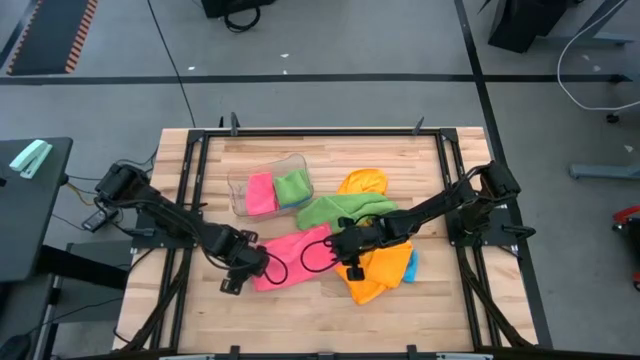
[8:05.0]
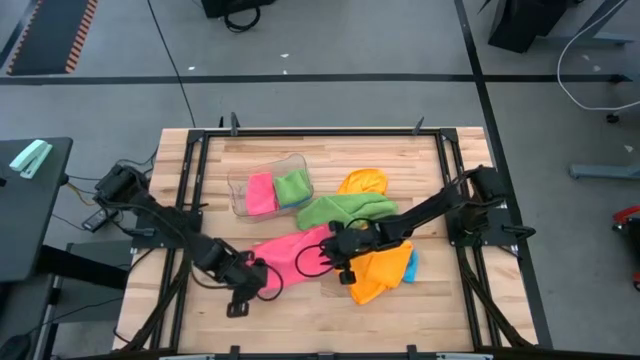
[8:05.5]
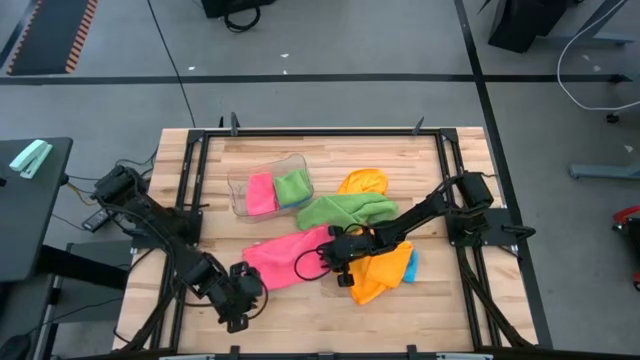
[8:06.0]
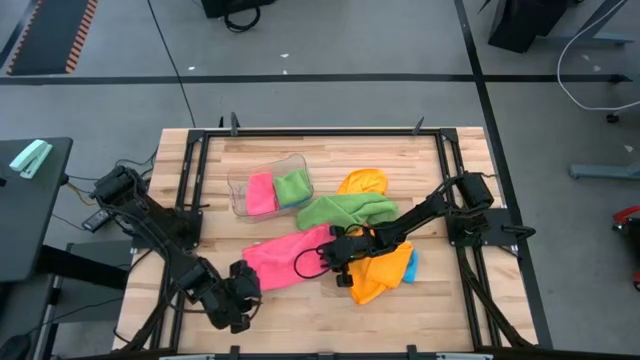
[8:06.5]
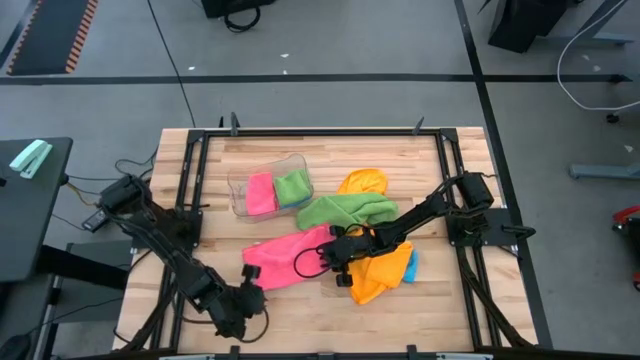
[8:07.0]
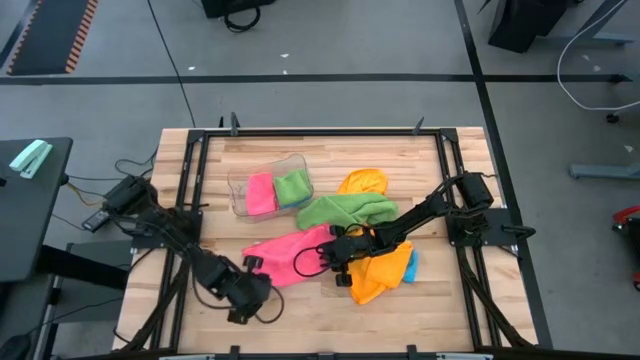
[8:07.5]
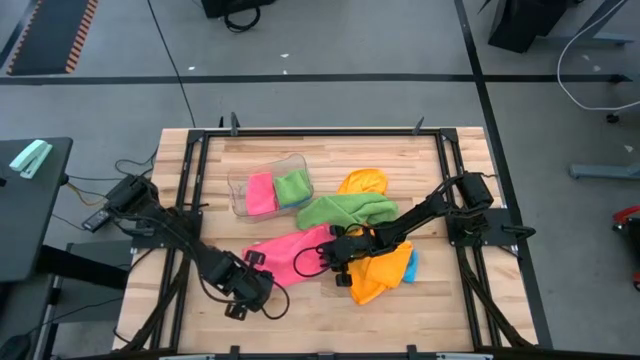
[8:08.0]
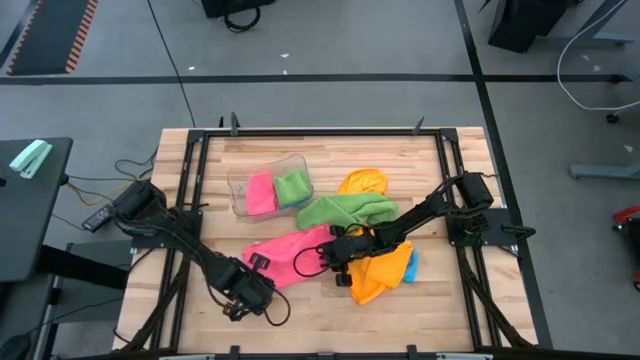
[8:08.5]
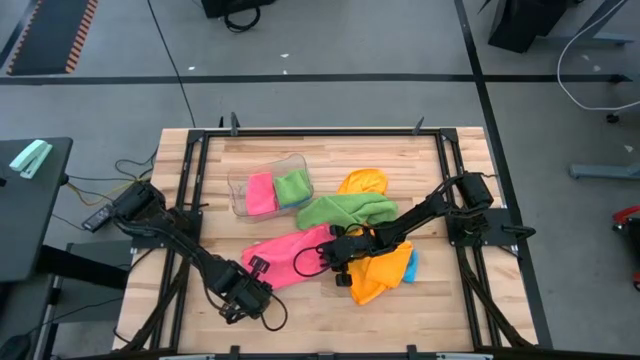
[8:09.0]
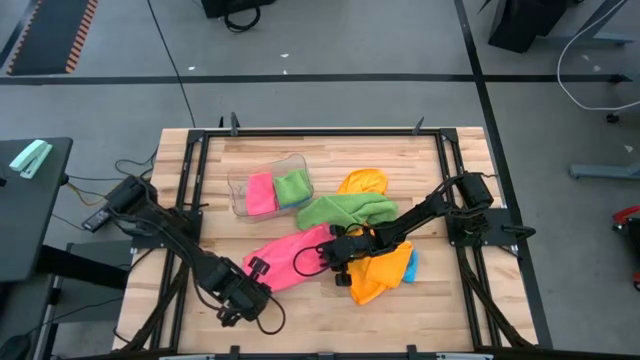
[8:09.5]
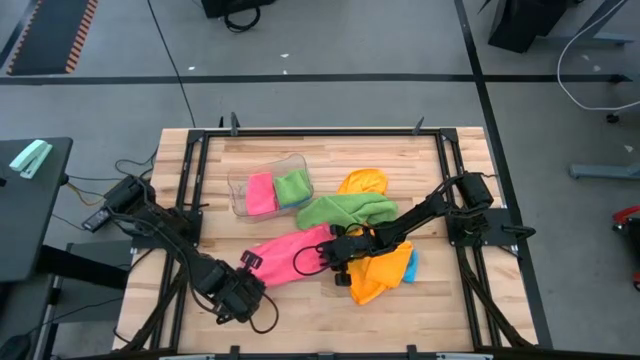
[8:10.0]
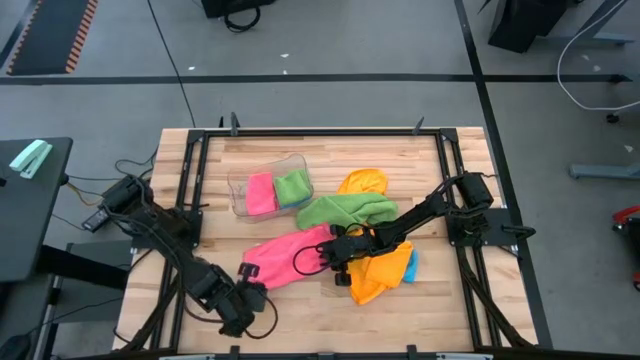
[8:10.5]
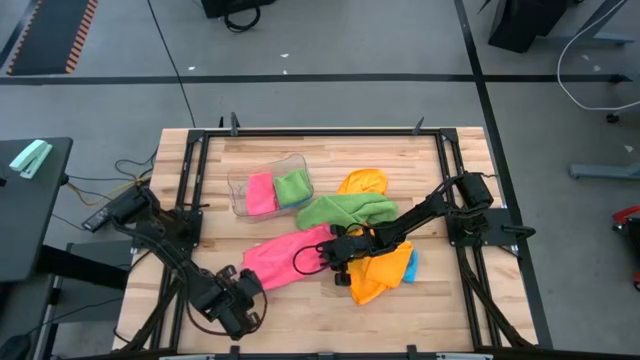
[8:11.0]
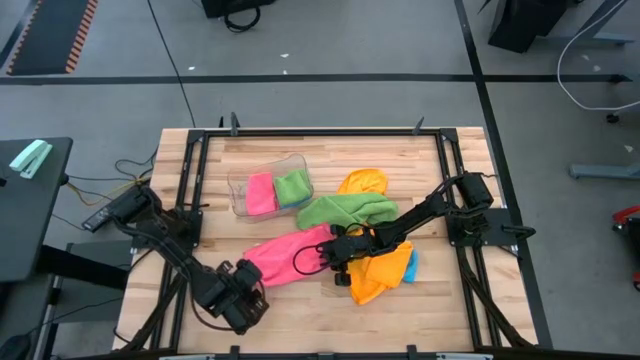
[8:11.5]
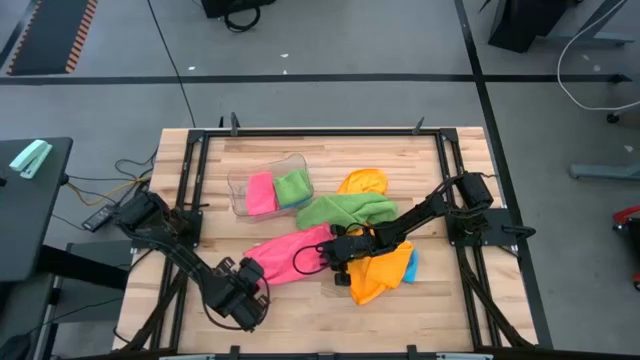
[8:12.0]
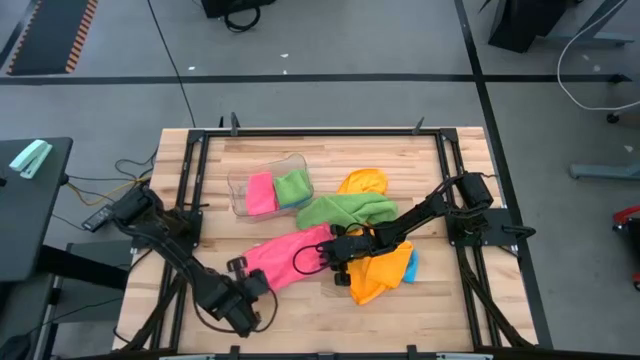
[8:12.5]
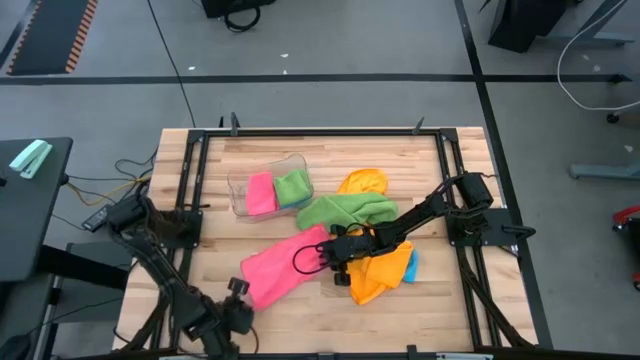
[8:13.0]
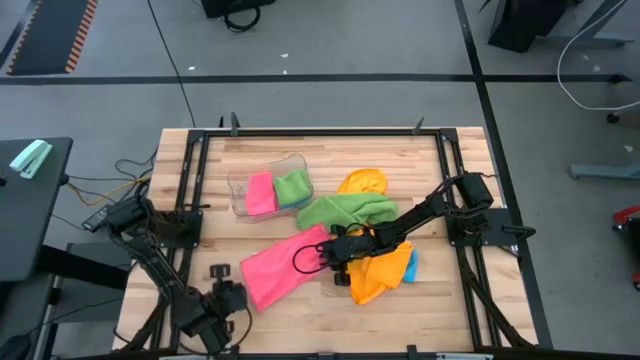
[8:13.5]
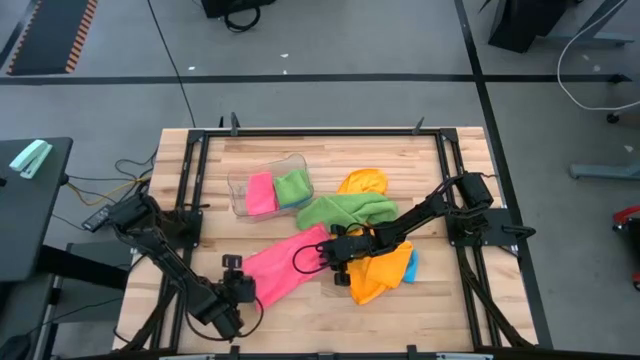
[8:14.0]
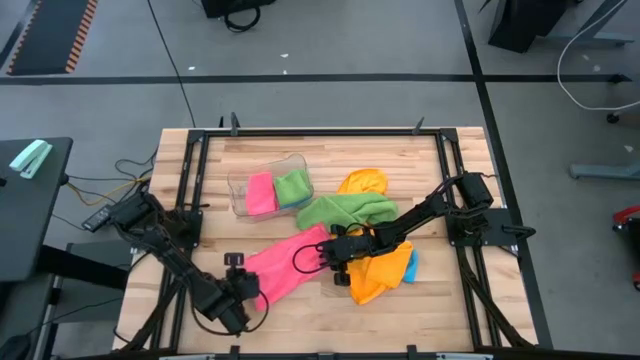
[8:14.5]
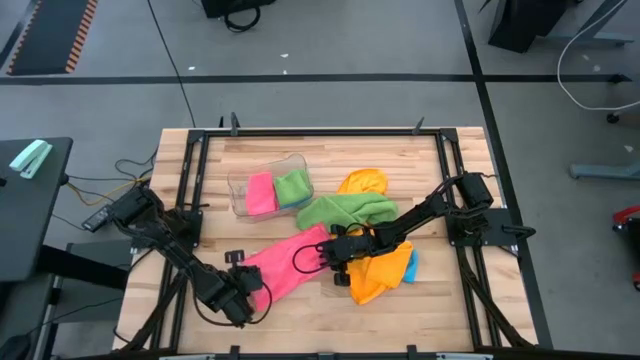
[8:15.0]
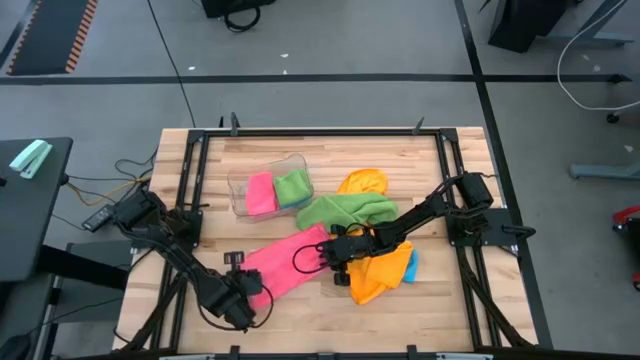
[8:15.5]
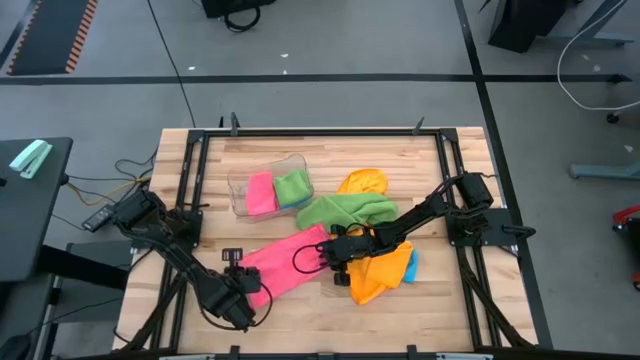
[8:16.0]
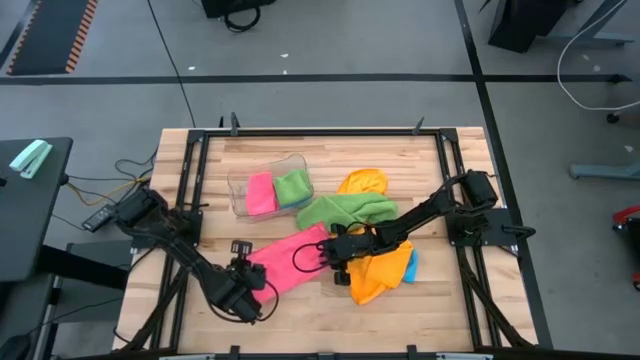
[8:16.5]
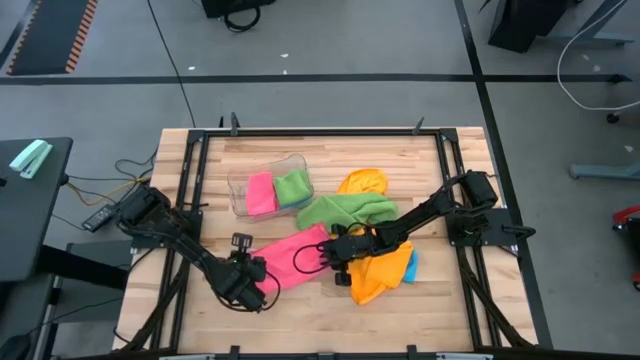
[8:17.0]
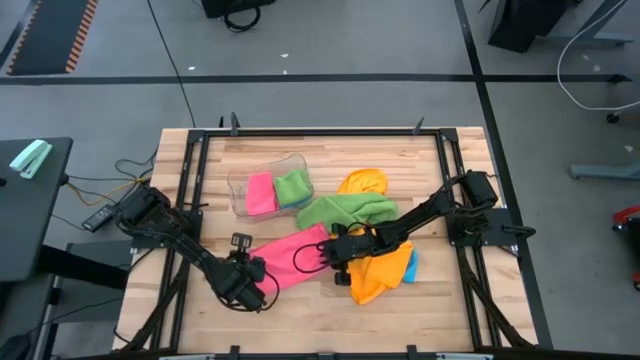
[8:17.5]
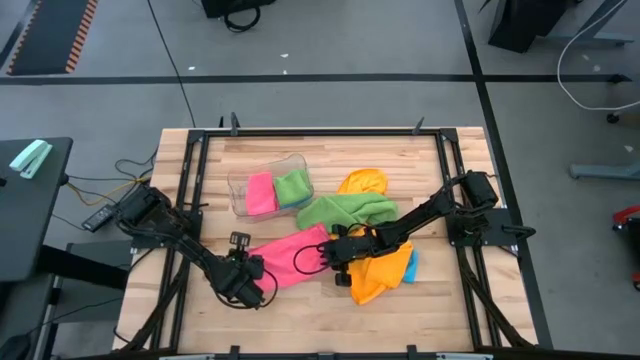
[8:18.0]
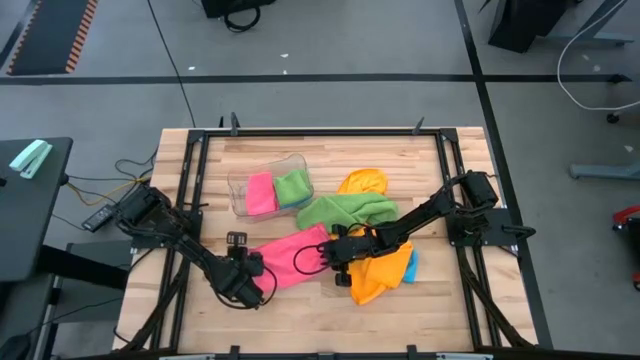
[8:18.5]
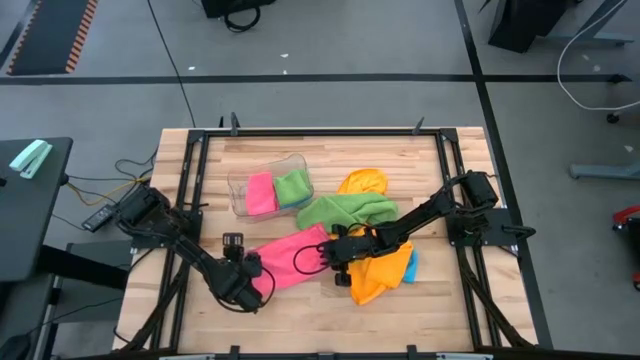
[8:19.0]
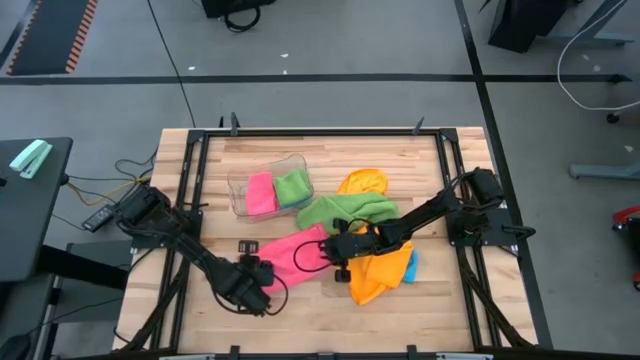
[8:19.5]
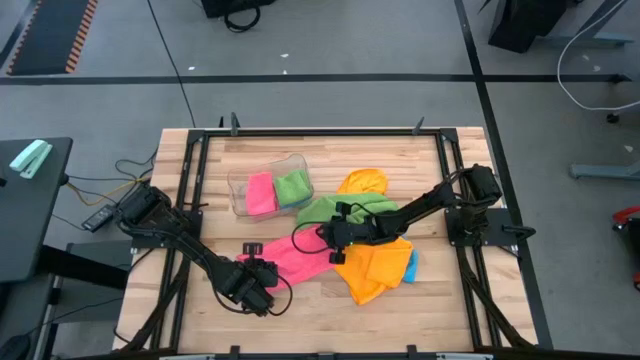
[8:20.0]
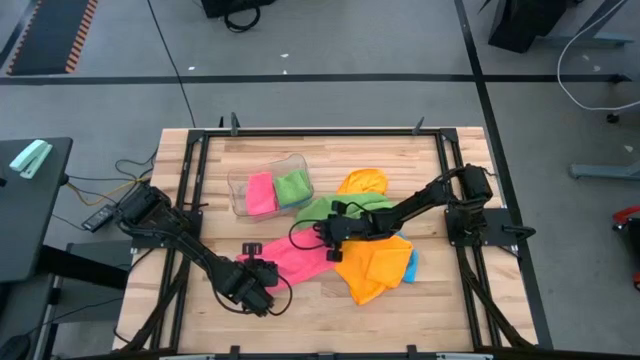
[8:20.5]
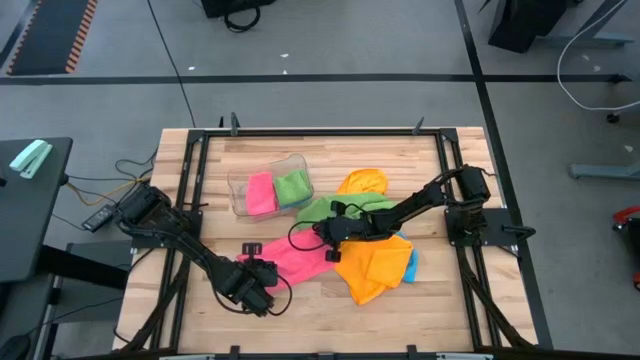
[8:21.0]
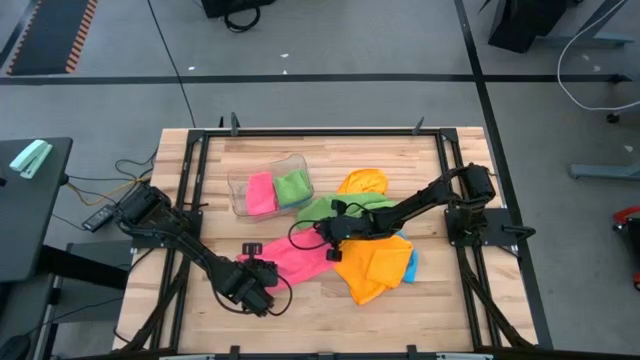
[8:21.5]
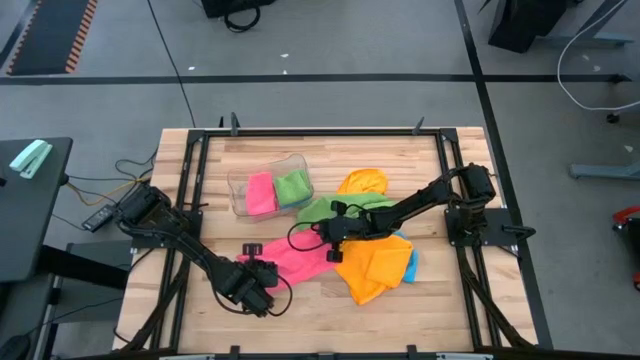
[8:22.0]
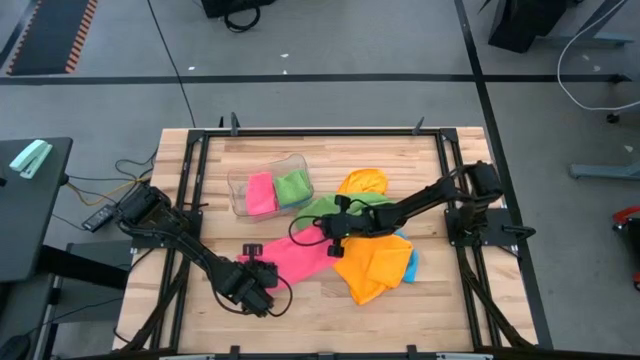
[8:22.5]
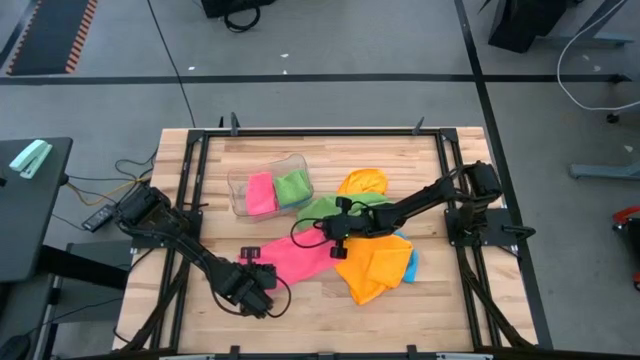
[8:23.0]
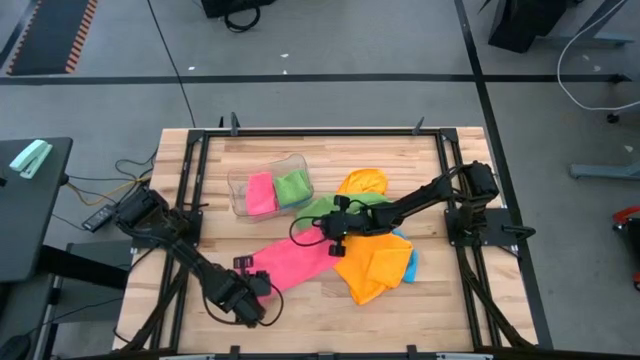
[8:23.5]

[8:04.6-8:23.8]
Task: Fold microfiber towels
Fold the pink microfiber towel

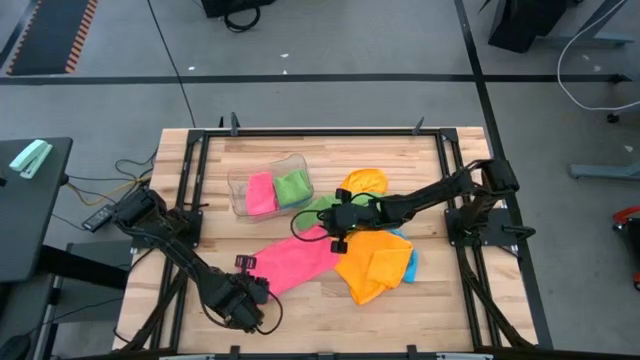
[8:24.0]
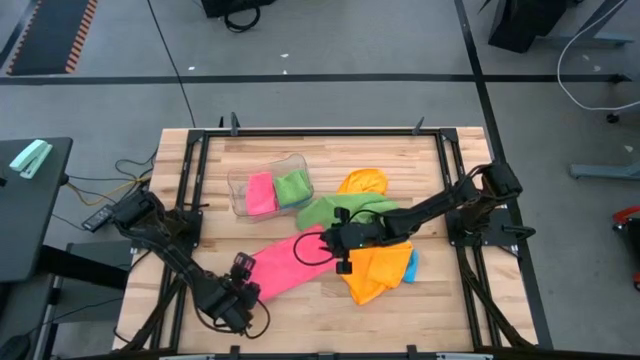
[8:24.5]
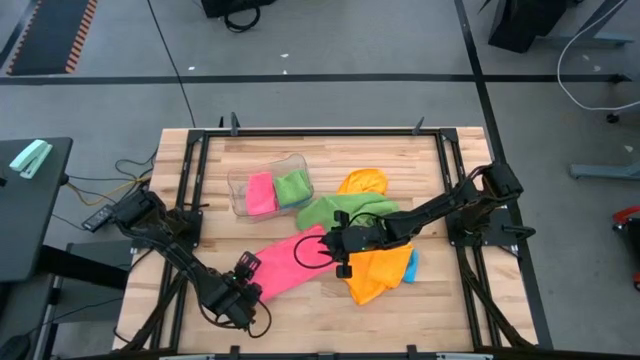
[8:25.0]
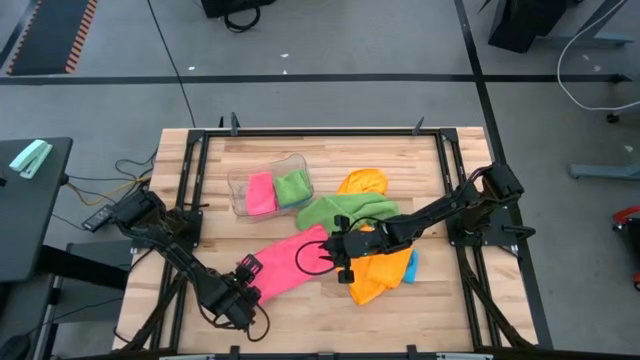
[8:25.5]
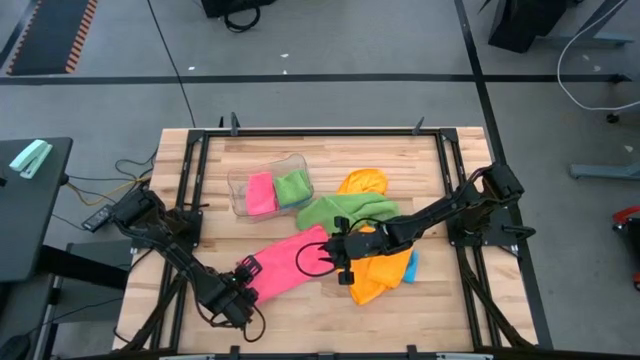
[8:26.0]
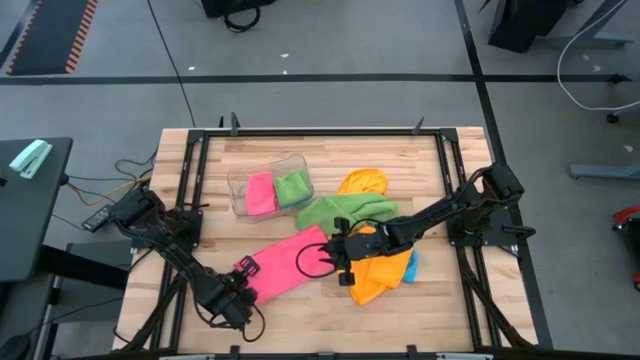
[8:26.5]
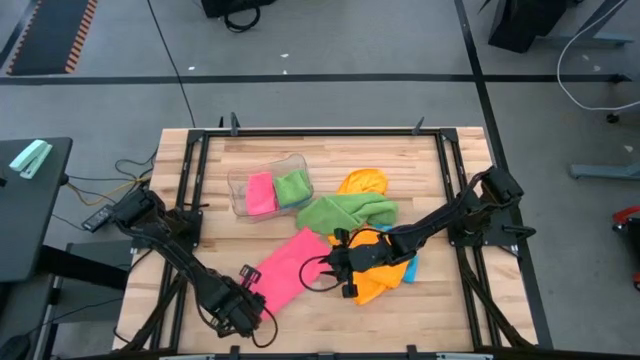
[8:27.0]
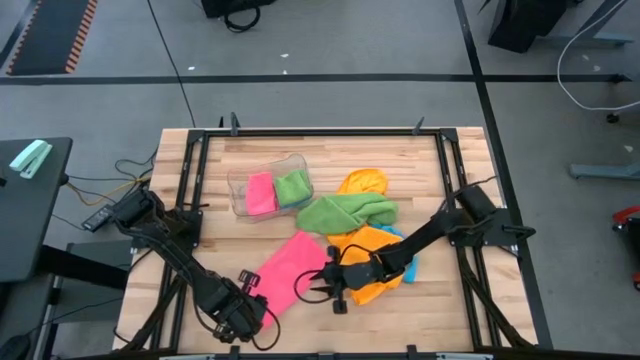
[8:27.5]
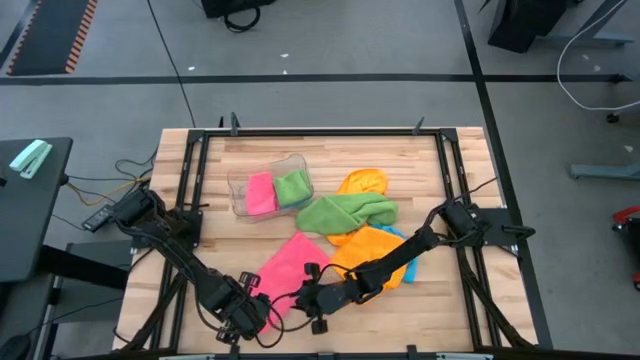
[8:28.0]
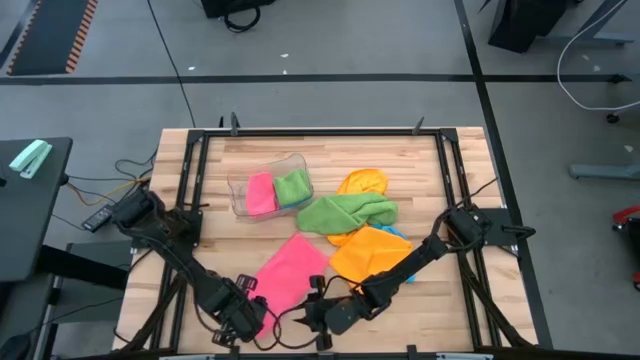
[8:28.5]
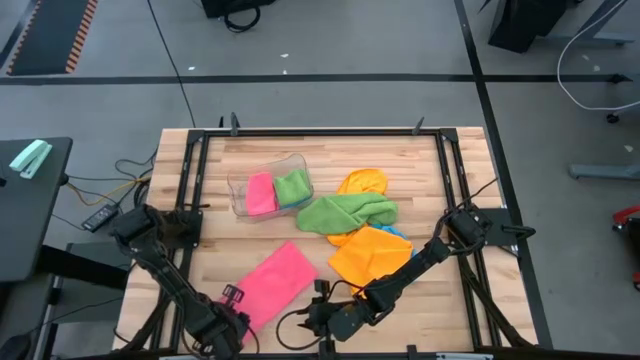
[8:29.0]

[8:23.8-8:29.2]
Fold the pink microfiber towel
